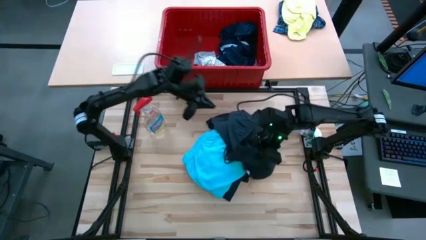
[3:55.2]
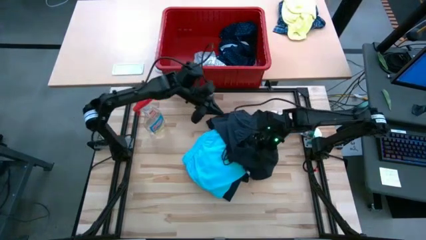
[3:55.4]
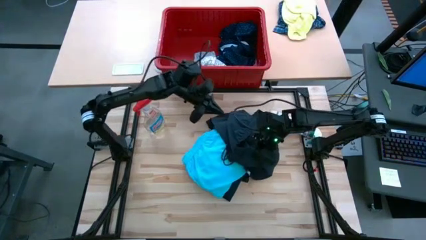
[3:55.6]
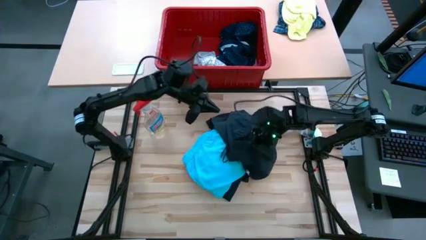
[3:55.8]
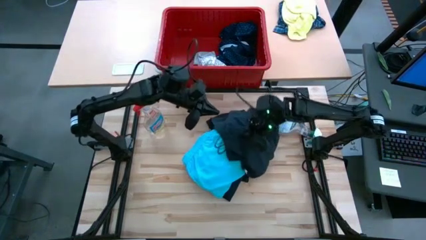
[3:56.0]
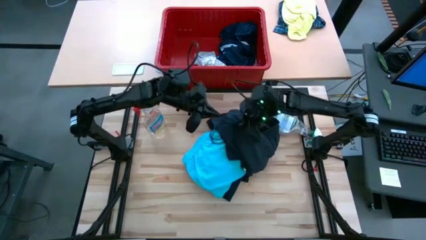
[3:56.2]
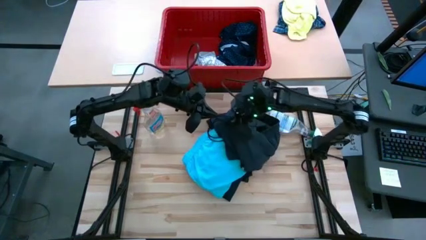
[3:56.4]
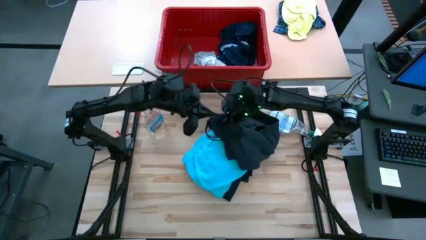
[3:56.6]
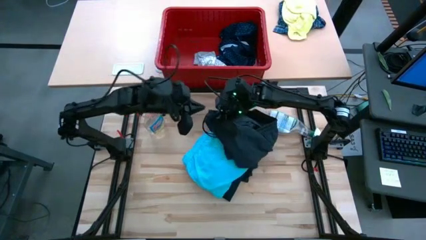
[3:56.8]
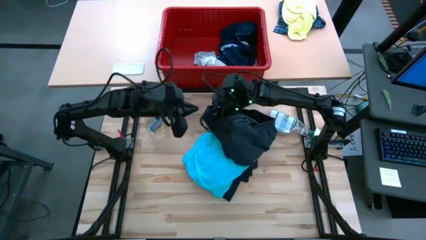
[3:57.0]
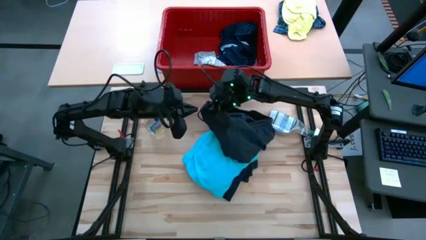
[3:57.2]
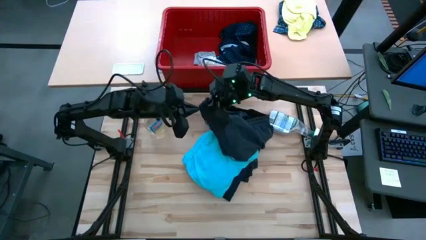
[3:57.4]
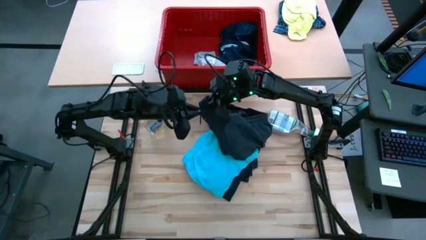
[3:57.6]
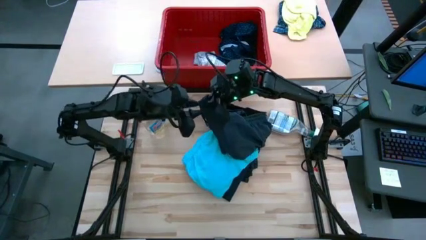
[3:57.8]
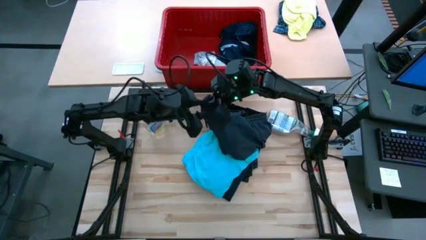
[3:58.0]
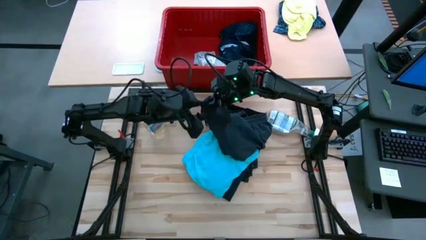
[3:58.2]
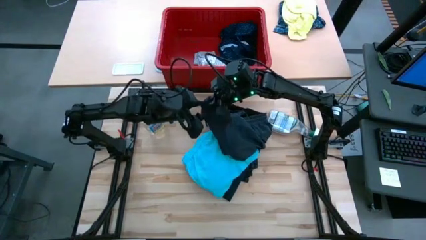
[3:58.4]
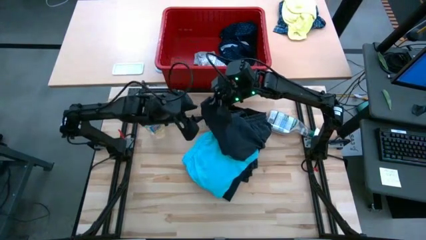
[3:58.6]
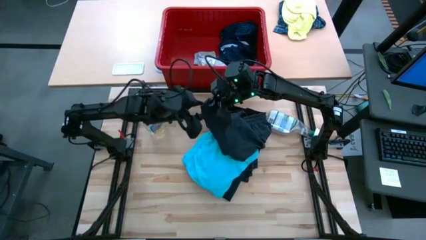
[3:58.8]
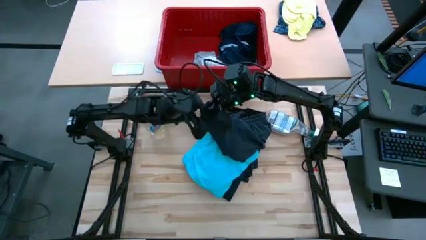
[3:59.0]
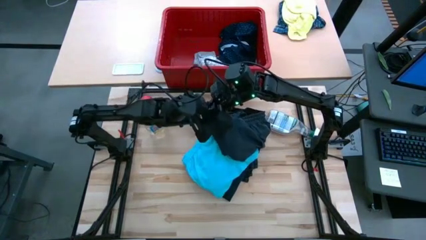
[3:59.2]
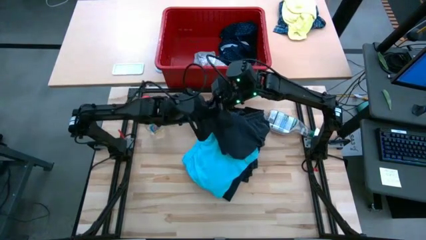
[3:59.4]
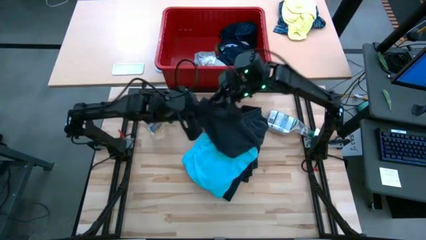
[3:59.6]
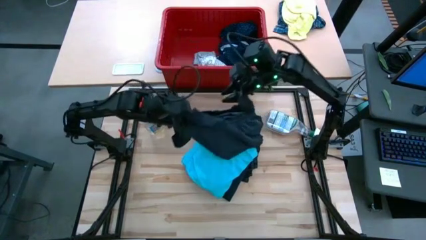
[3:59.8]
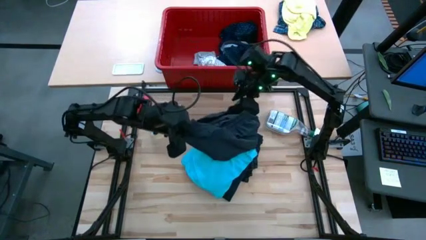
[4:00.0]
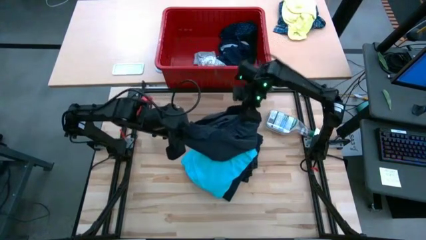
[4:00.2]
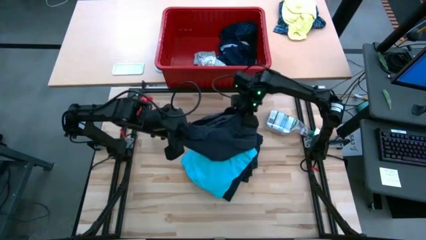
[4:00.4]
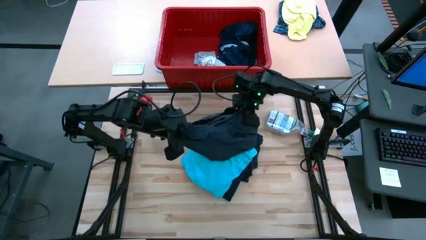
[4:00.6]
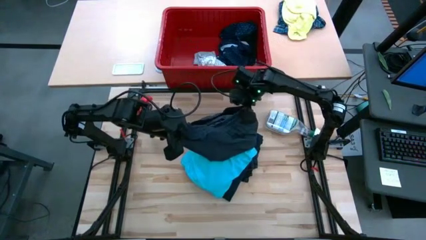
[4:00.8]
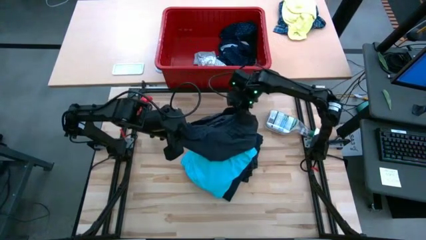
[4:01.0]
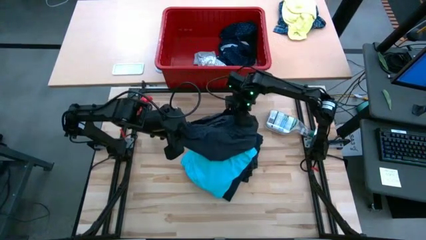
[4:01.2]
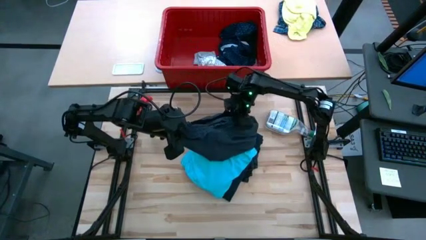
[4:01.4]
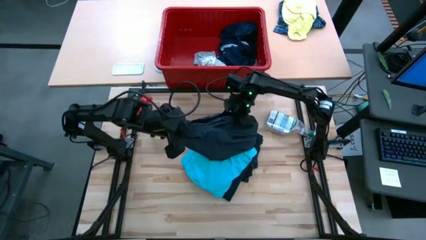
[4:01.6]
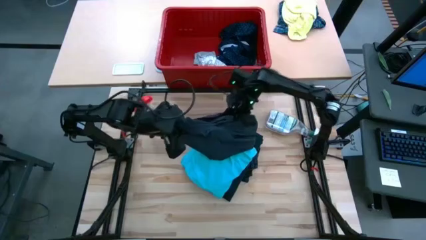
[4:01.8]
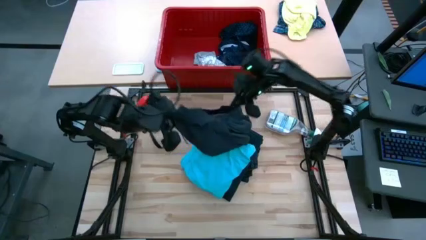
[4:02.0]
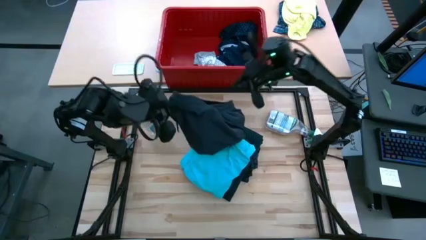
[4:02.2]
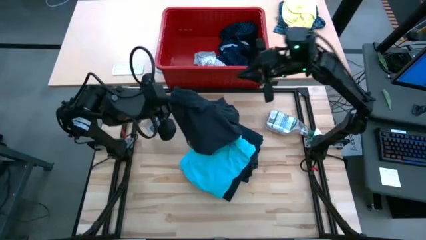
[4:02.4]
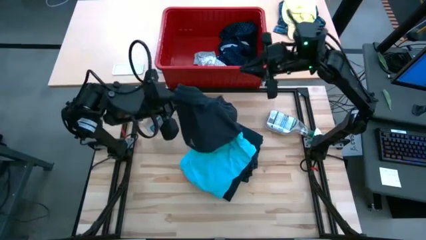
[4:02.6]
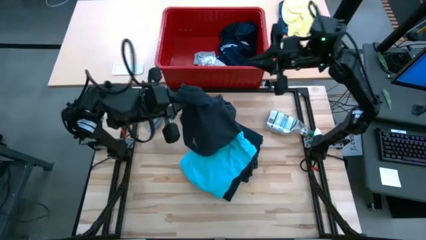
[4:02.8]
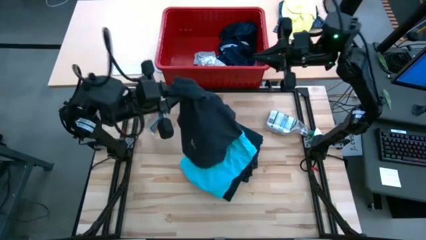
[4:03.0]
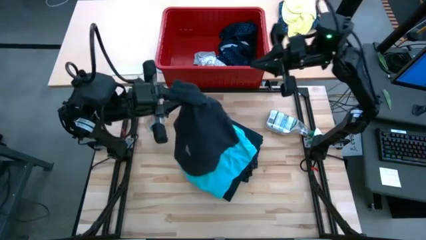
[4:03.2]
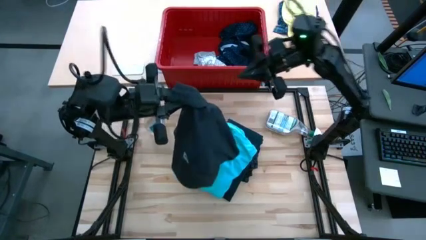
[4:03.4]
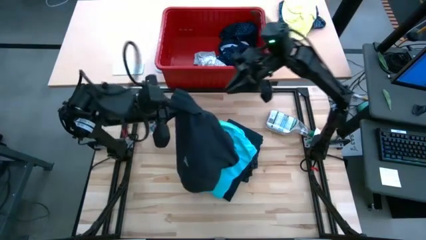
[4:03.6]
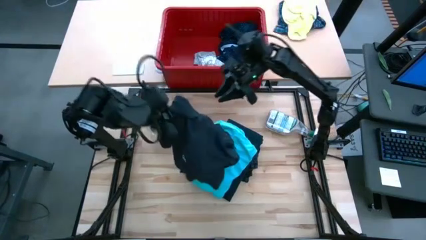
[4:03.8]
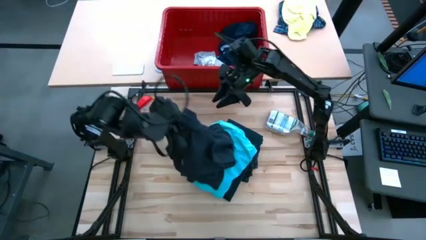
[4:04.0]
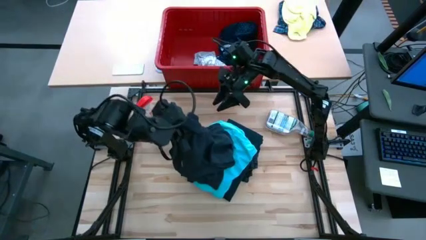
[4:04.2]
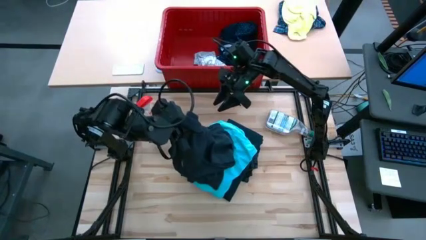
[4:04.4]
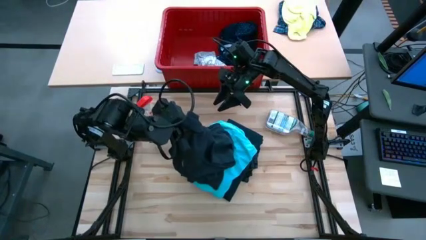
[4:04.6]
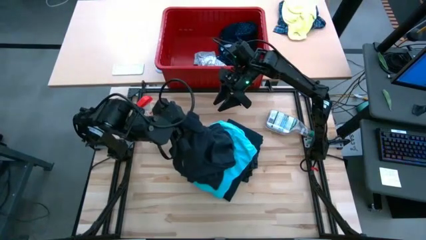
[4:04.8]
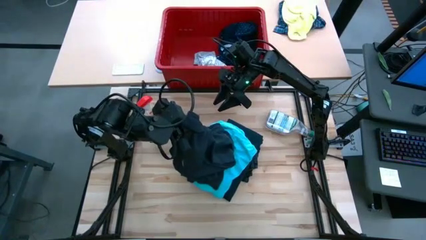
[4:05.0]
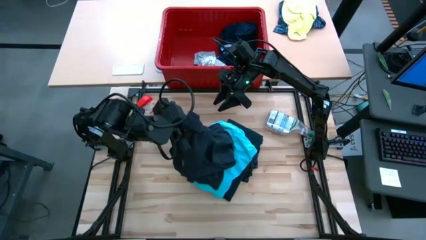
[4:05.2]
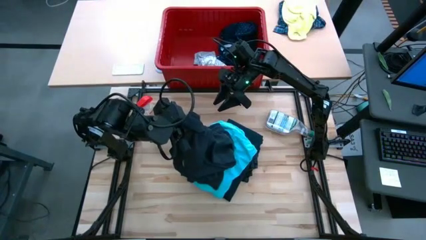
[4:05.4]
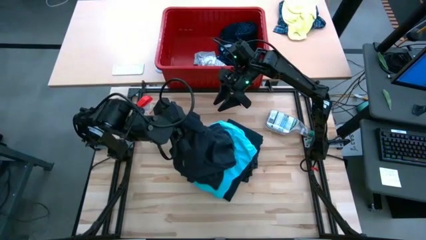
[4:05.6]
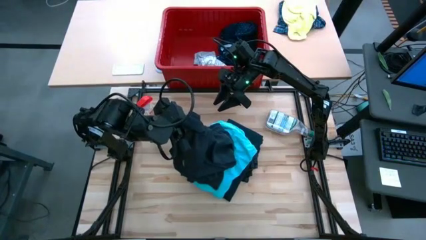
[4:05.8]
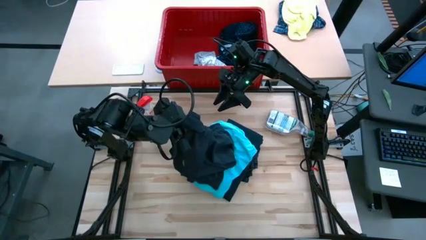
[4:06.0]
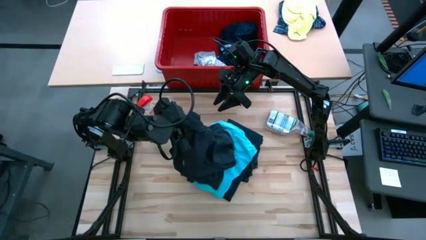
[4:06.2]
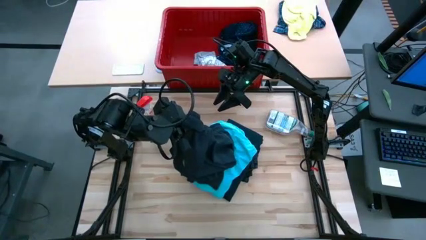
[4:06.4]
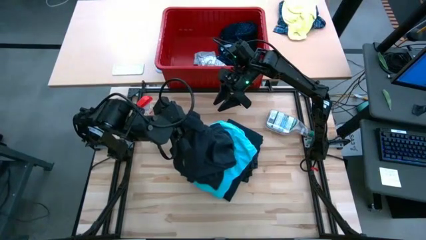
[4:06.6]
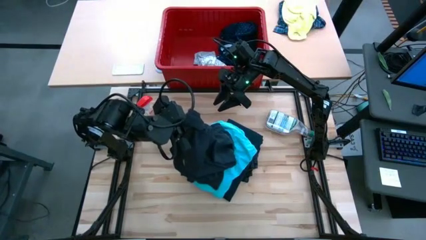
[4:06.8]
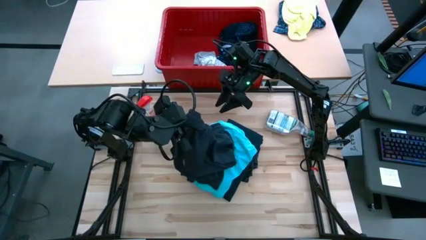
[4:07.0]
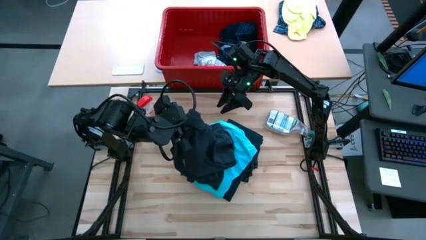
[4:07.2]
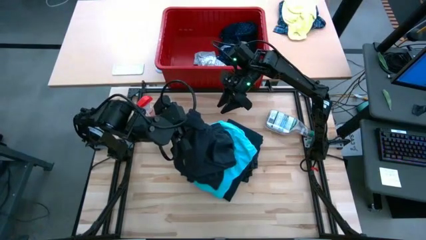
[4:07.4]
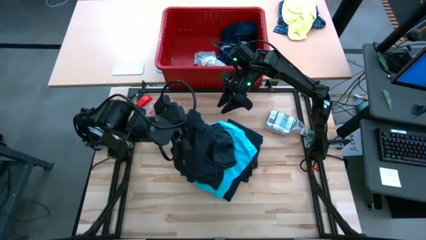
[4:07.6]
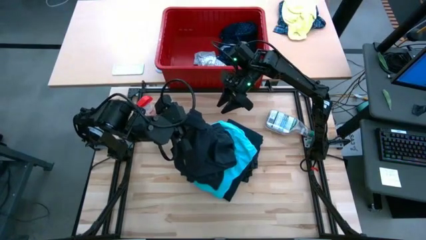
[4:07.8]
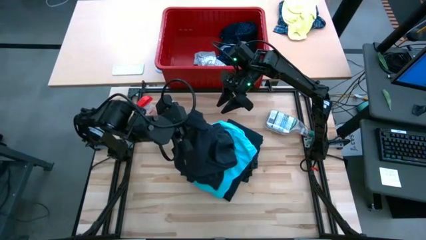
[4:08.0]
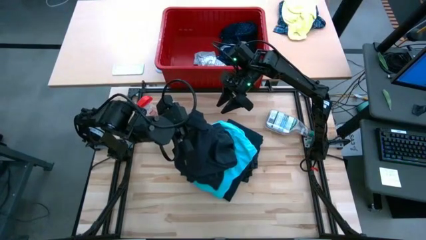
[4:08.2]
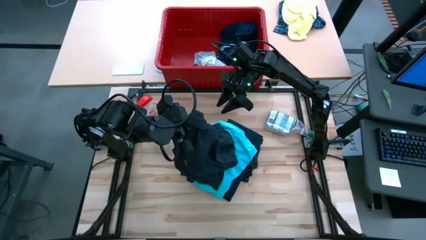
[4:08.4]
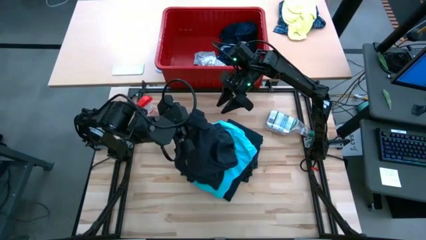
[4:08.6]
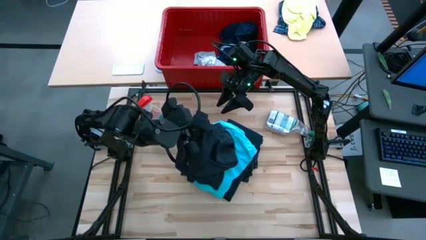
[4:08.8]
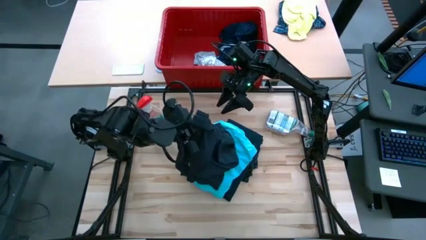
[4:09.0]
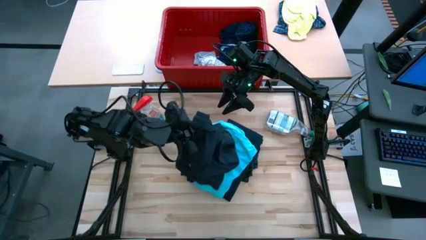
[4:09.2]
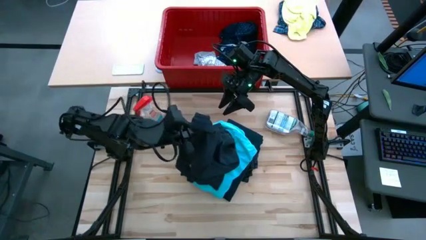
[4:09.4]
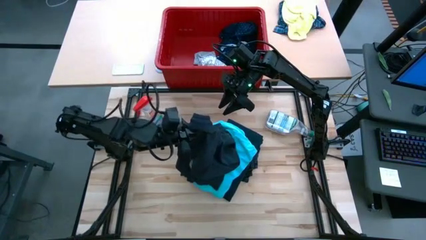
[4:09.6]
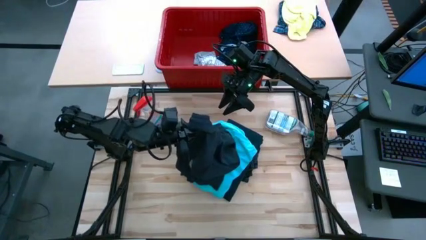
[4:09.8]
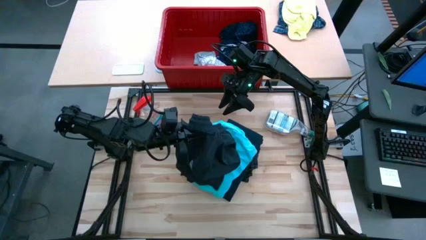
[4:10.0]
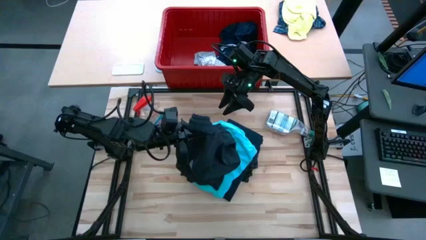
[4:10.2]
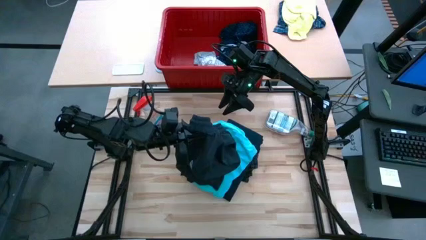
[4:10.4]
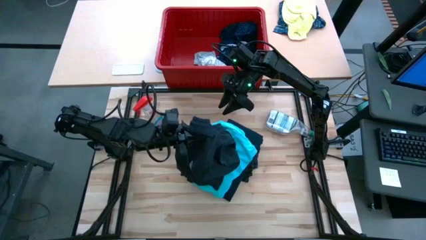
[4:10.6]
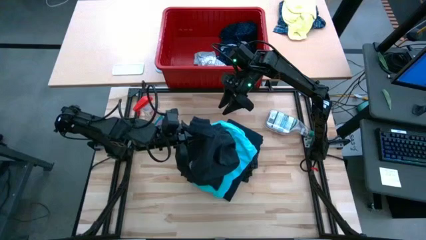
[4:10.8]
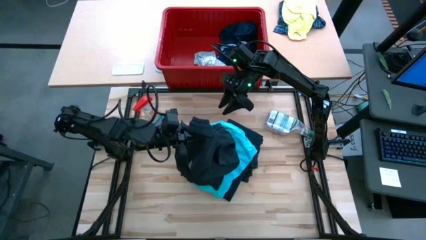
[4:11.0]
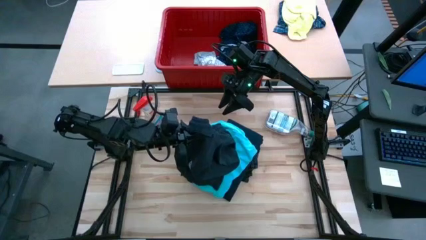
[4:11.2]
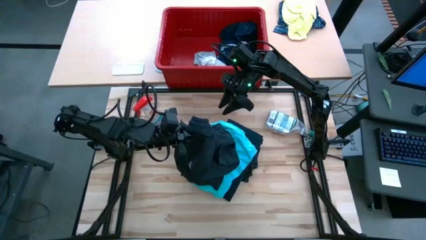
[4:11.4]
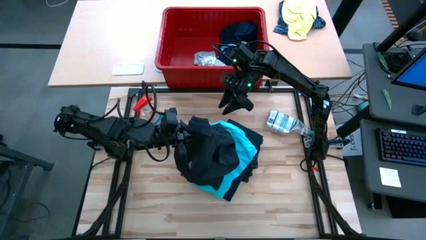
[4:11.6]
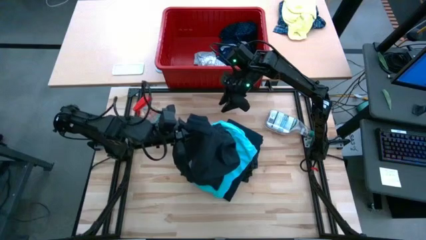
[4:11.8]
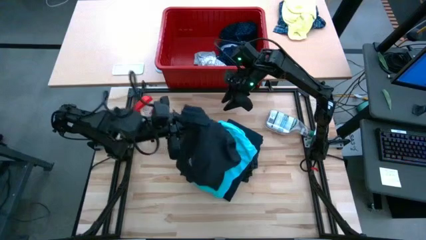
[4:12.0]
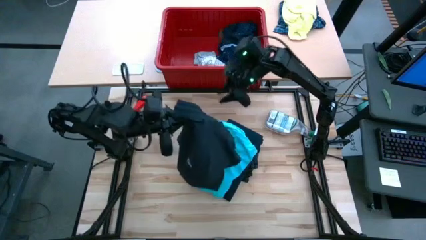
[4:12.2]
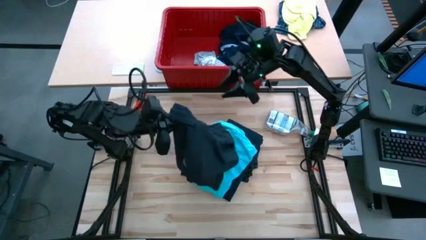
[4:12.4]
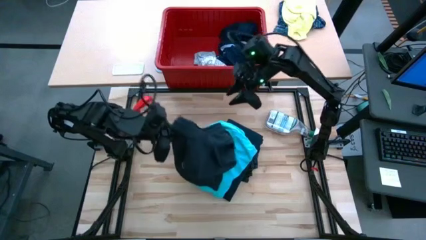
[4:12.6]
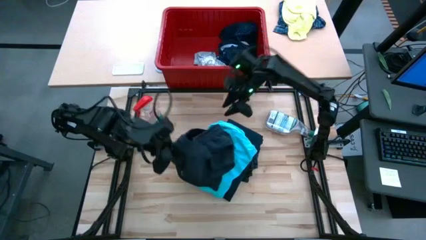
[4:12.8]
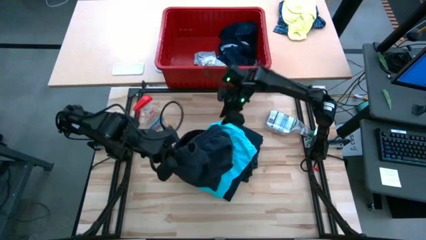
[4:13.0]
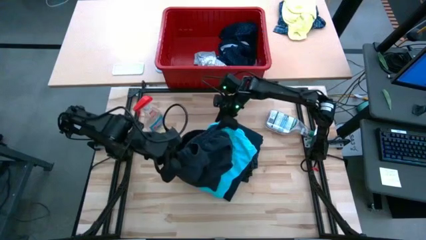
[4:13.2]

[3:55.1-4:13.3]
Task: Fold Laundry from Bin
Fold the black shorts
